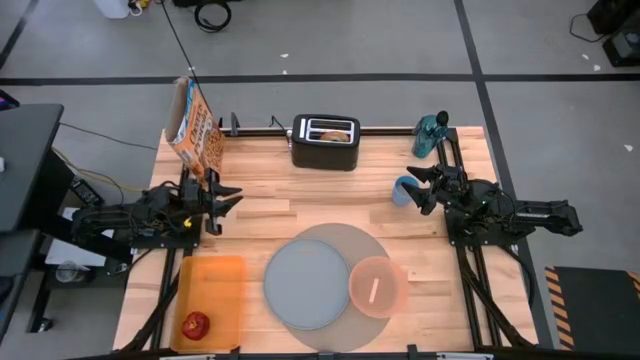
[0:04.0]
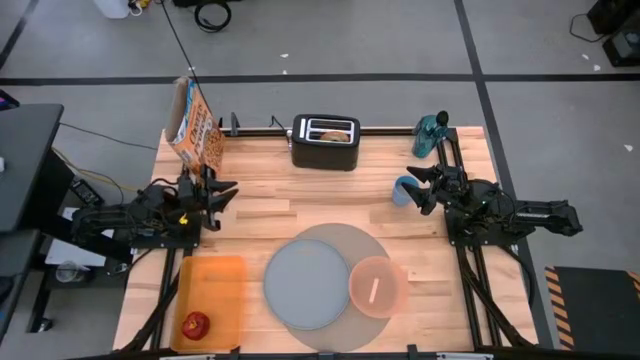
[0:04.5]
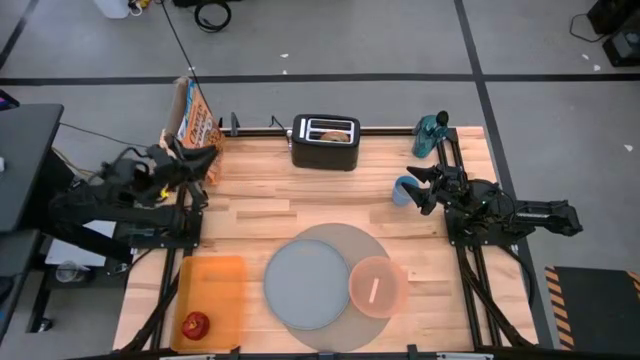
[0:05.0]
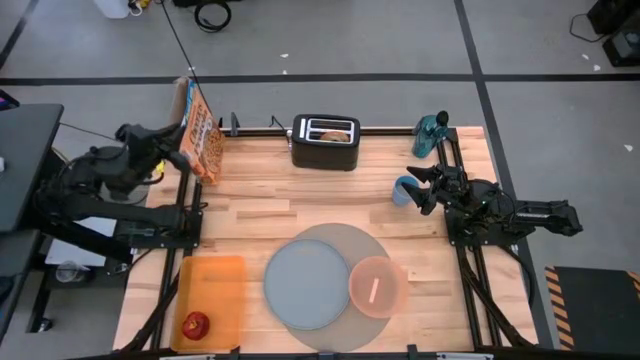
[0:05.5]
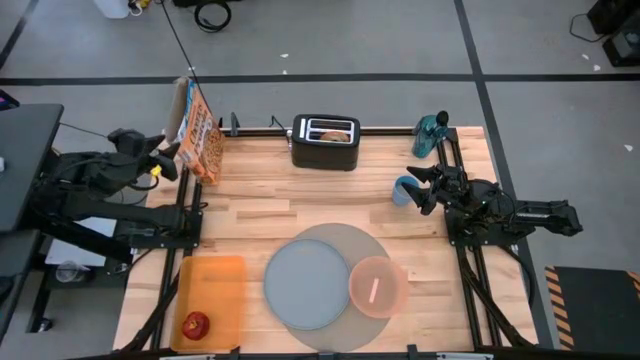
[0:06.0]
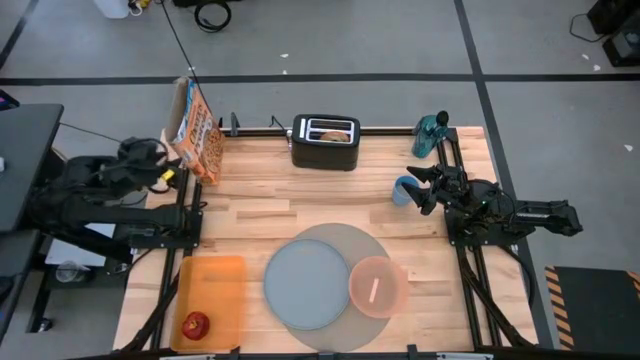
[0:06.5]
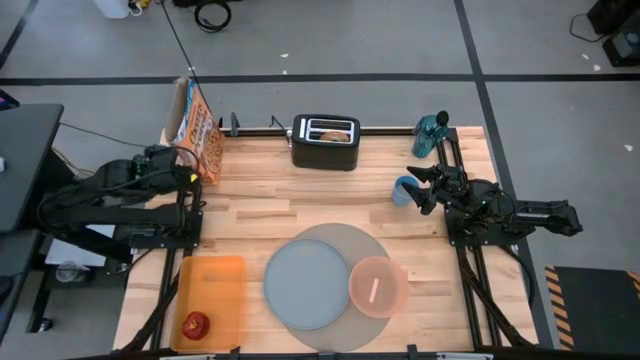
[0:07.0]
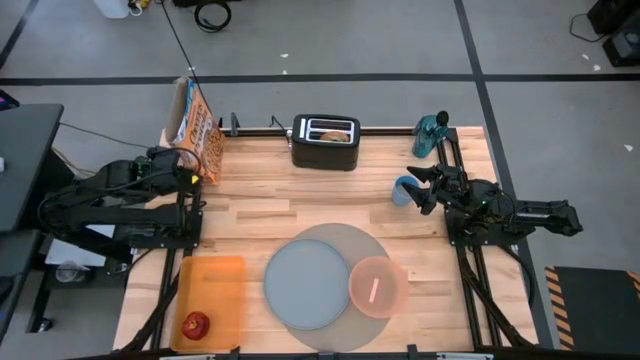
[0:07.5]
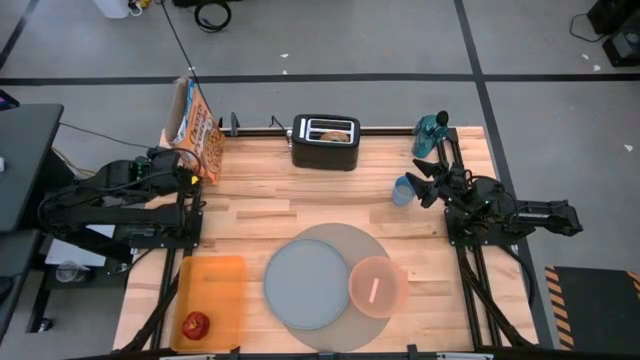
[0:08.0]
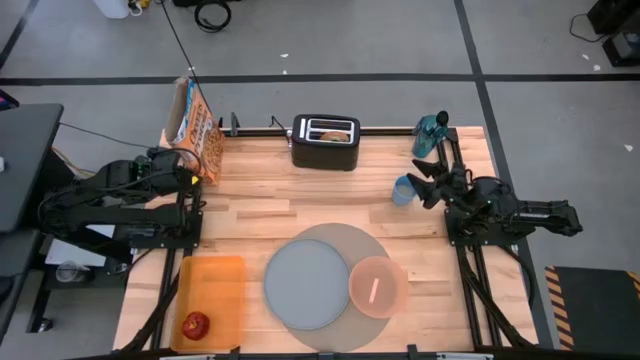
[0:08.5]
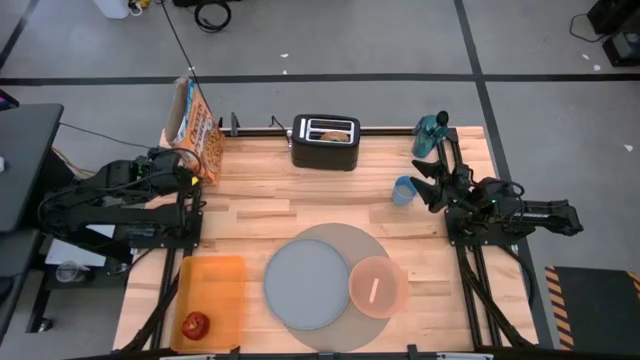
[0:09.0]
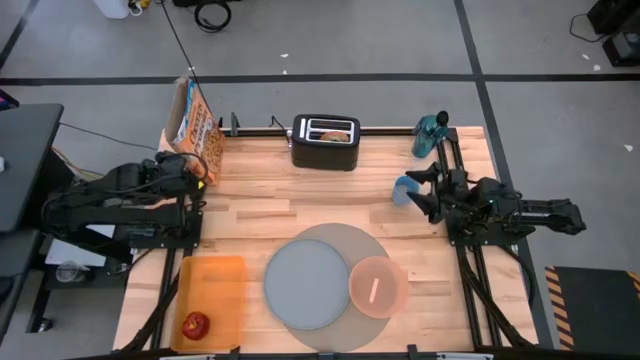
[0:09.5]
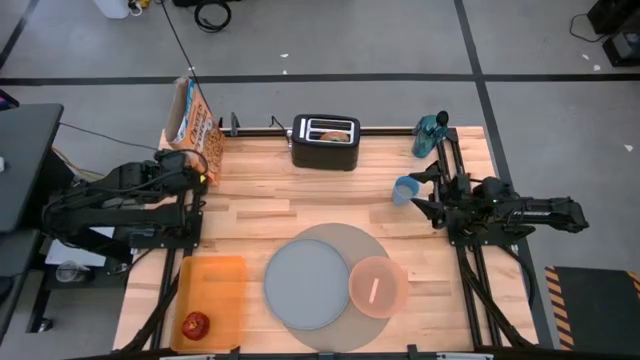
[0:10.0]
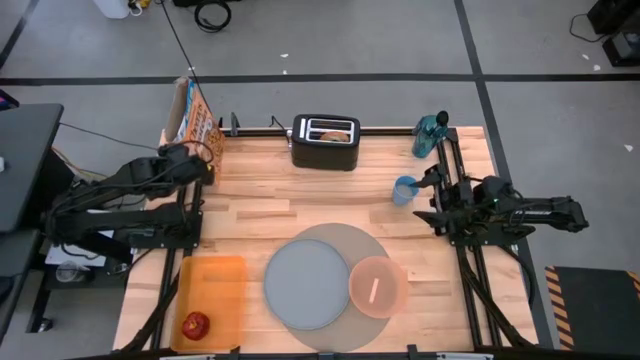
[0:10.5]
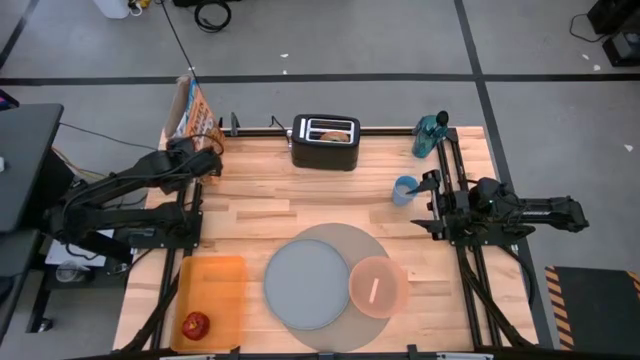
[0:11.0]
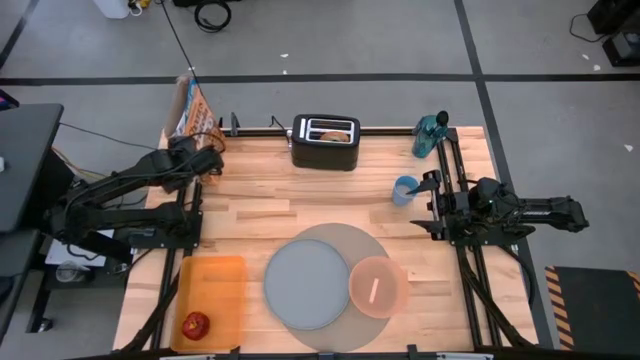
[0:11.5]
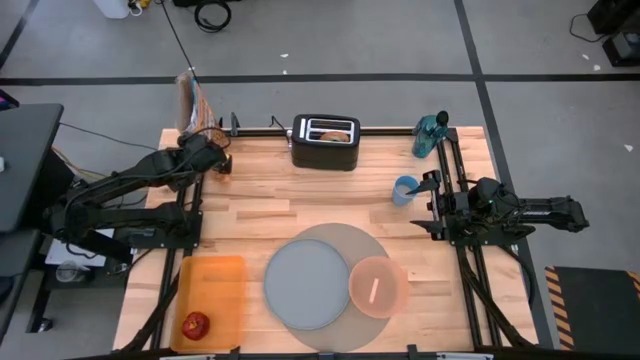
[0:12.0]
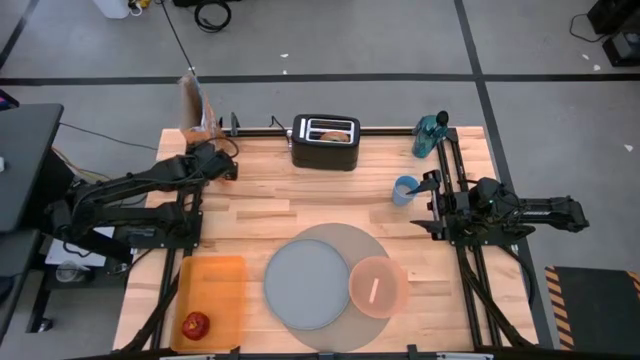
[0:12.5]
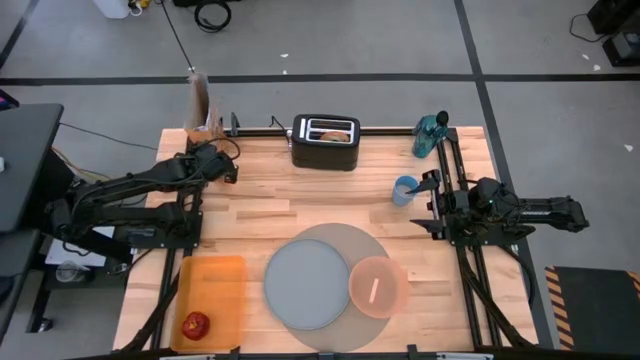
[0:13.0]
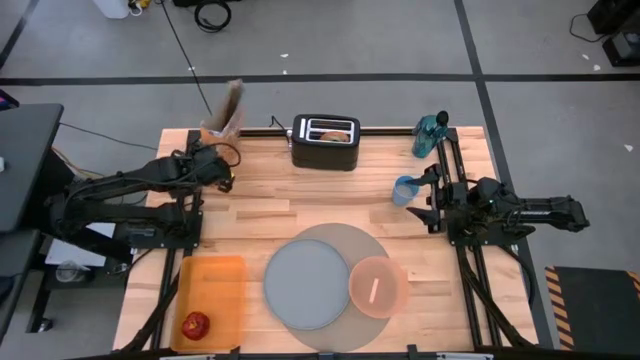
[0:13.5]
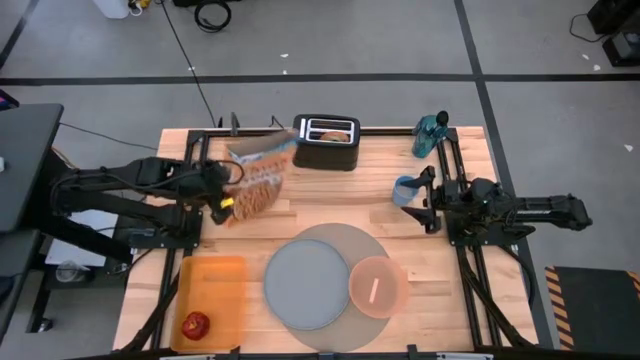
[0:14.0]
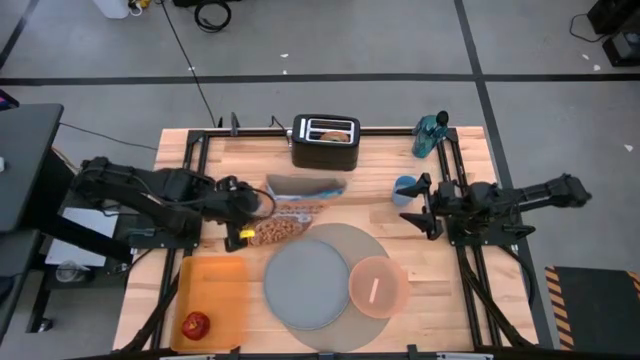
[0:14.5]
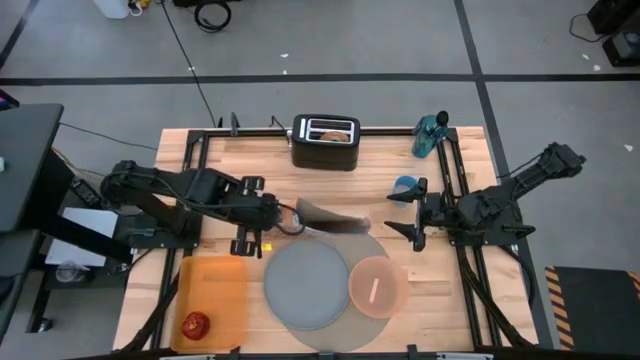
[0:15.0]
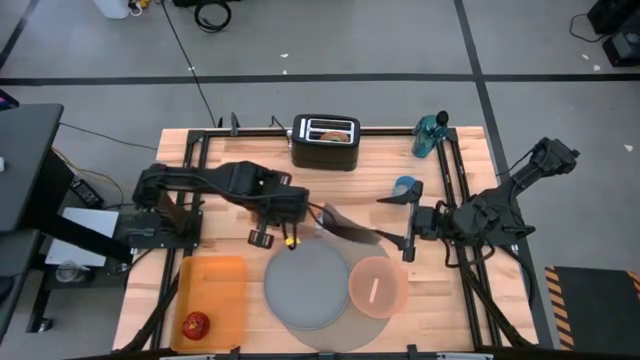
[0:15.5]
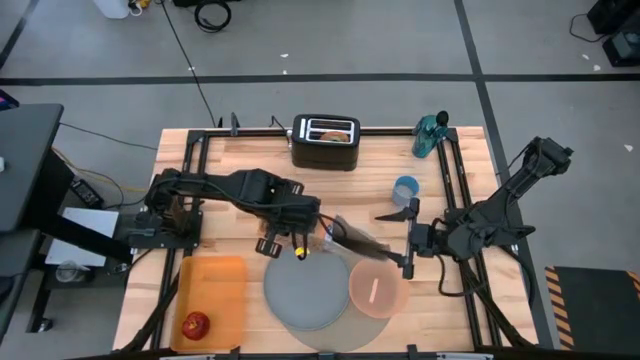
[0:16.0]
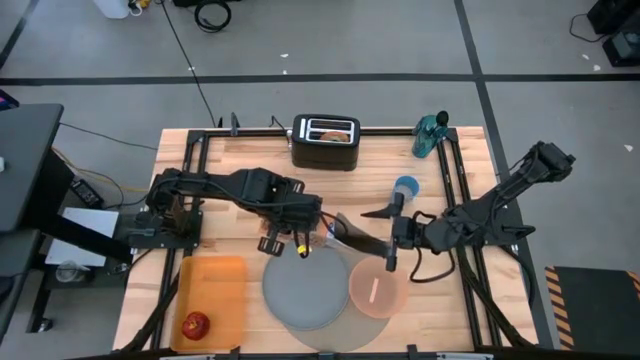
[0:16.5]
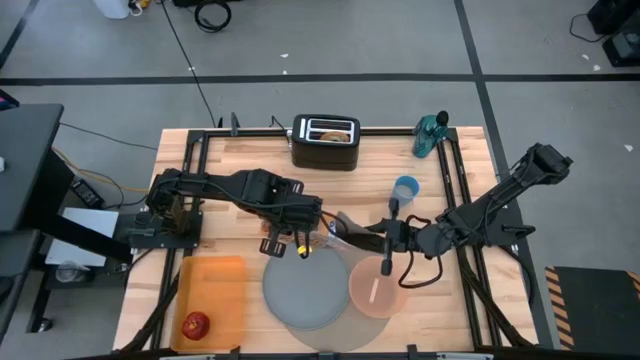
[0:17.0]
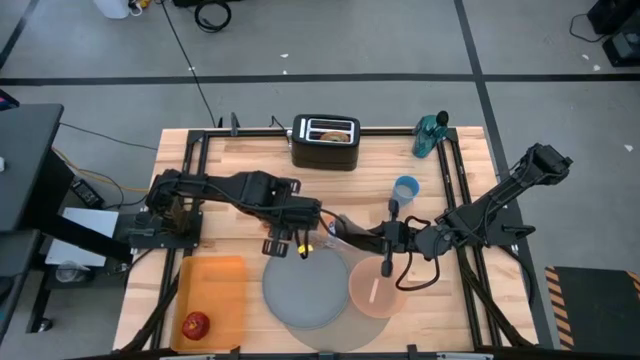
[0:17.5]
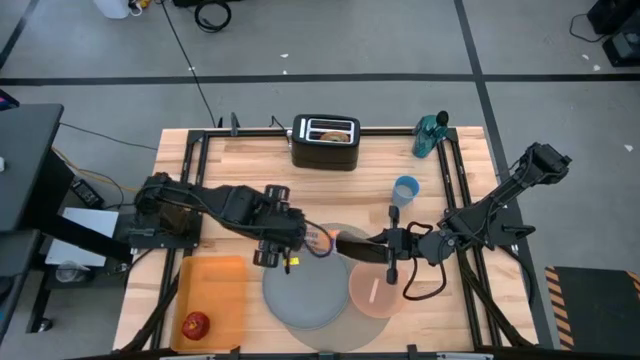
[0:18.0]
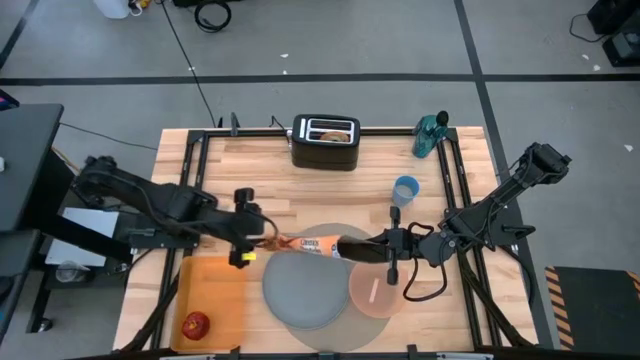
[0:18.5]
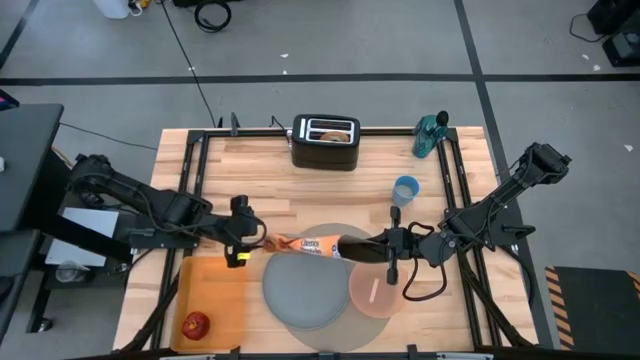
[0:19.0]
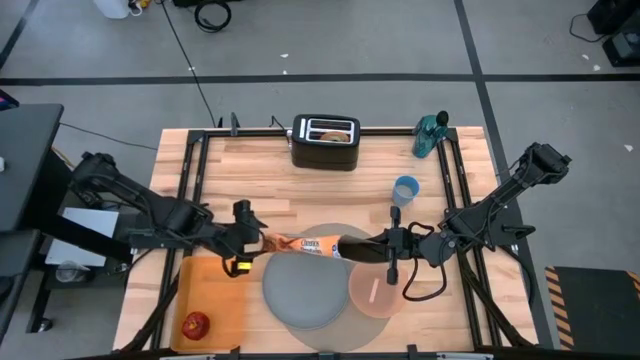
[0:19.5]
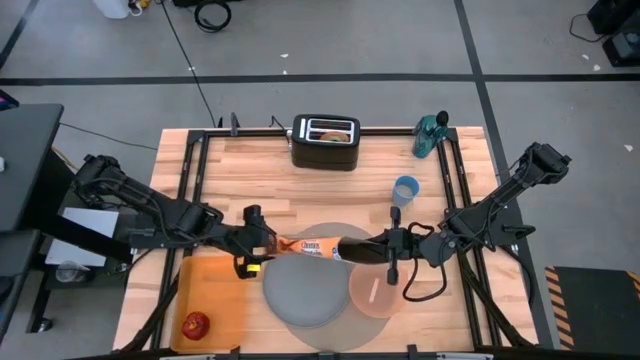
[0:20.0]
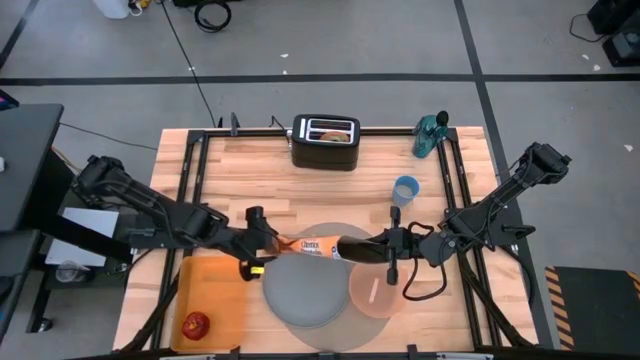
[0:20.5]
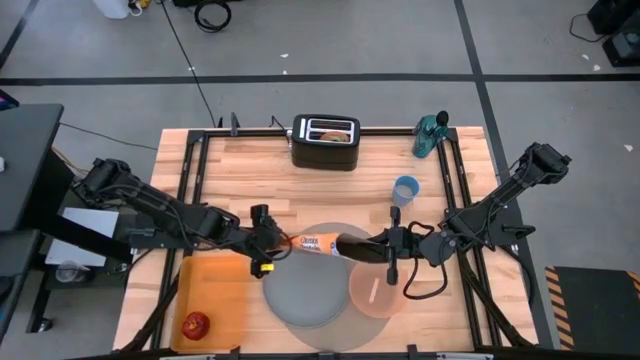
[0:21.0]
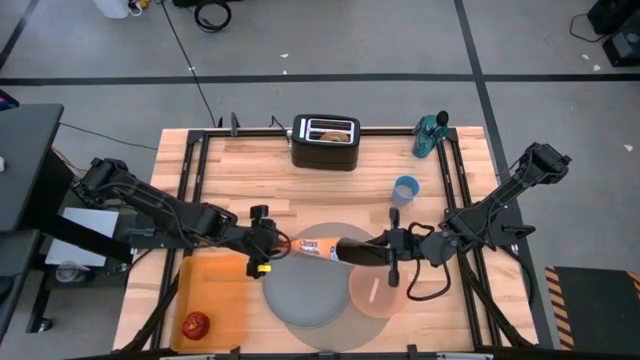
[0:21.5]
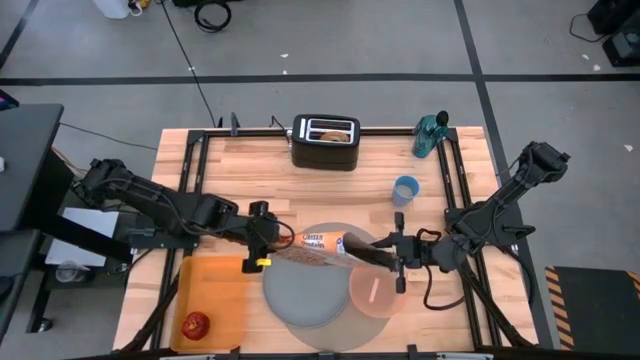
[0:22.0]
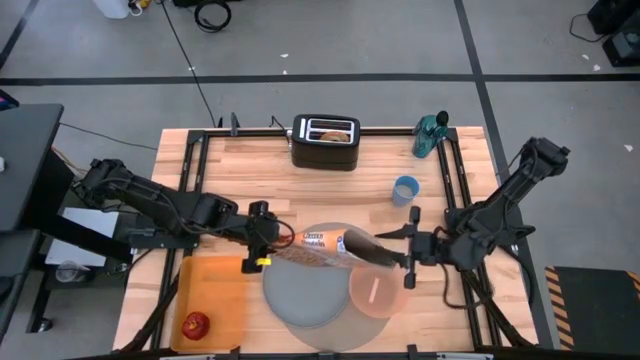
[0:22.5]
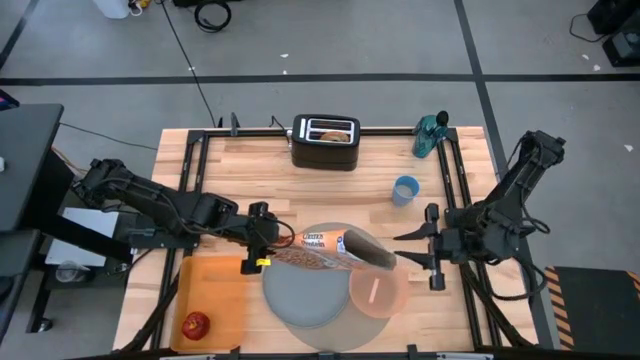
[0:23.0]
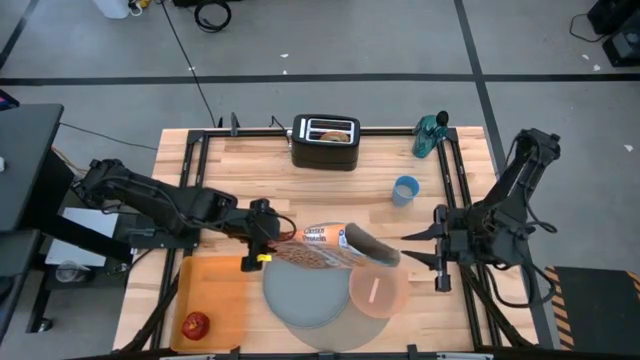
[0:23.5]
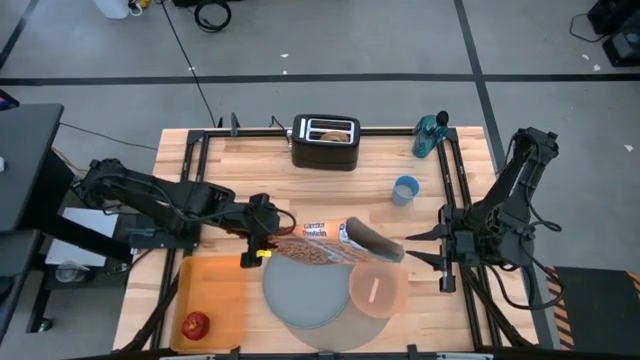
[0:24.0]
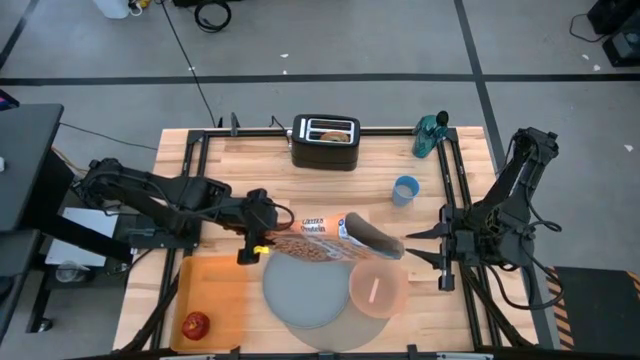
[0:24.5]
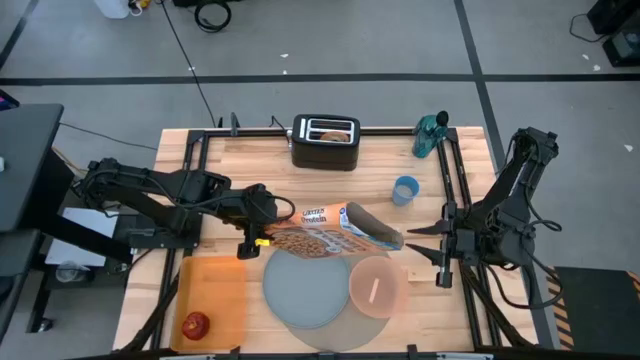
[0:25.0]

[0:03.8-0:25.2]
Task: Arrange a breakfast setting
Put cereal into the pink bowl
